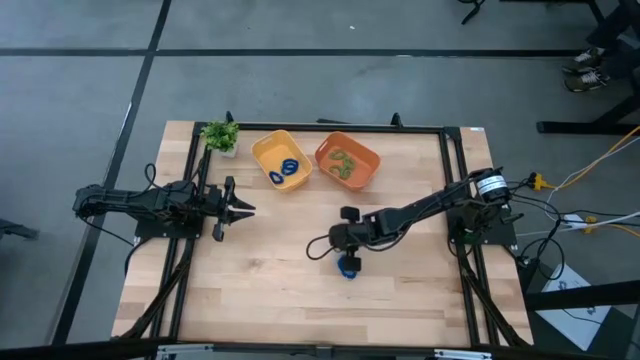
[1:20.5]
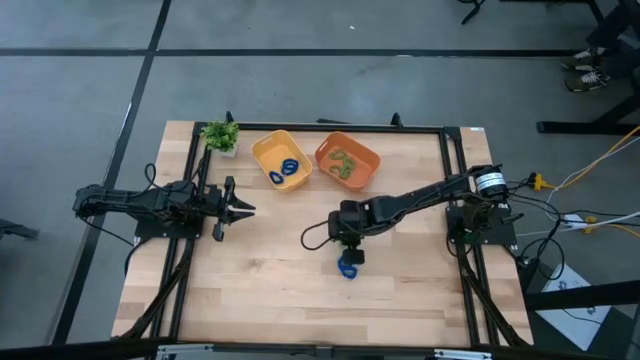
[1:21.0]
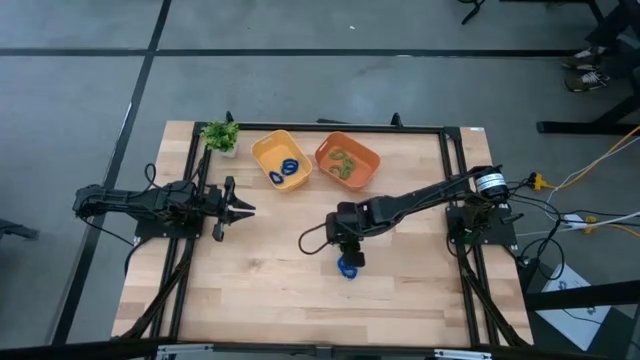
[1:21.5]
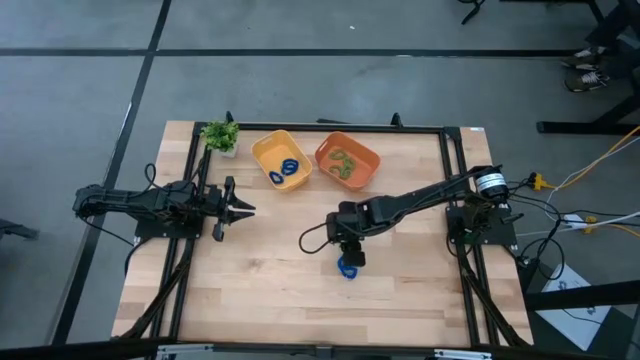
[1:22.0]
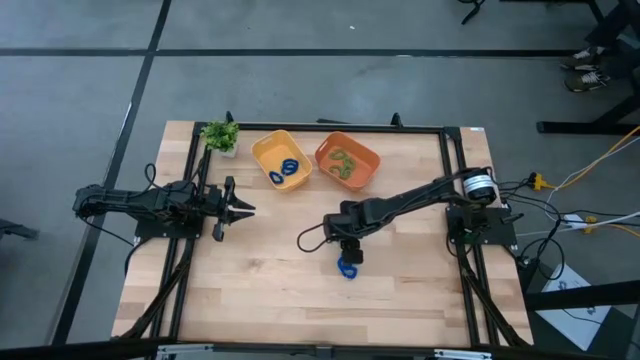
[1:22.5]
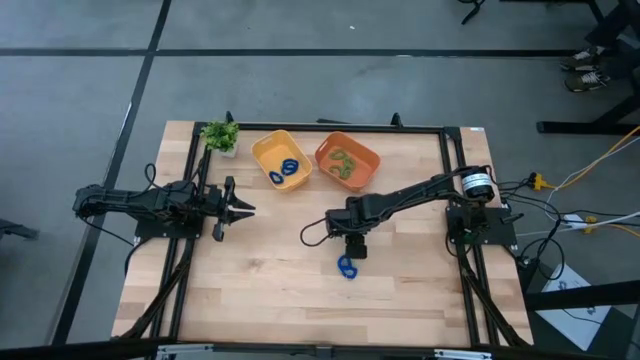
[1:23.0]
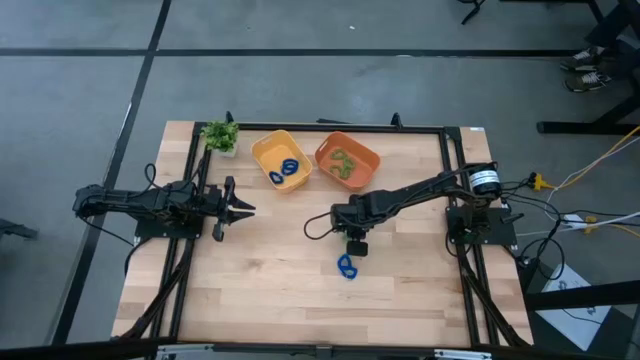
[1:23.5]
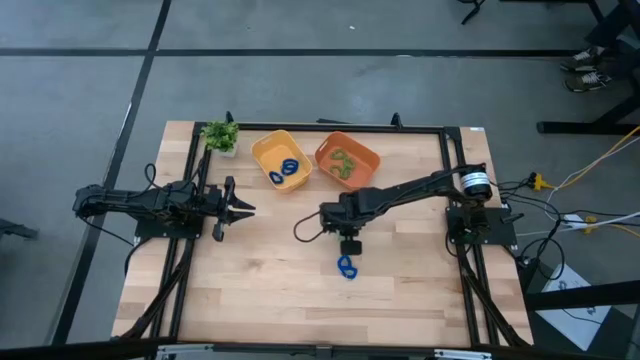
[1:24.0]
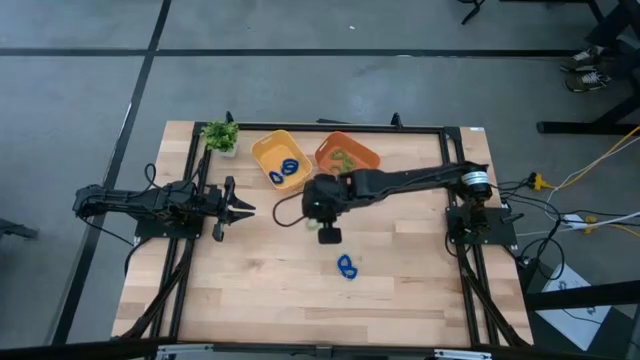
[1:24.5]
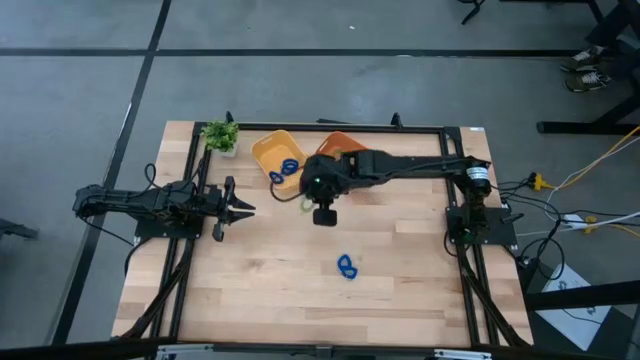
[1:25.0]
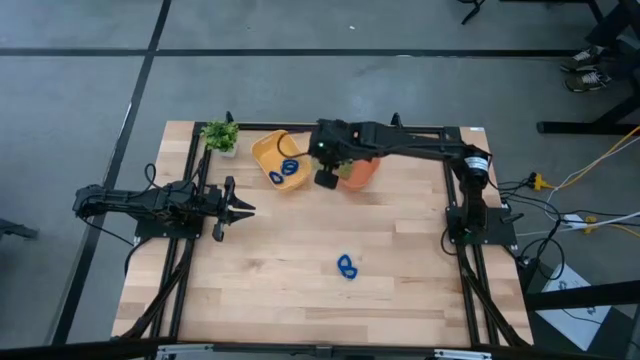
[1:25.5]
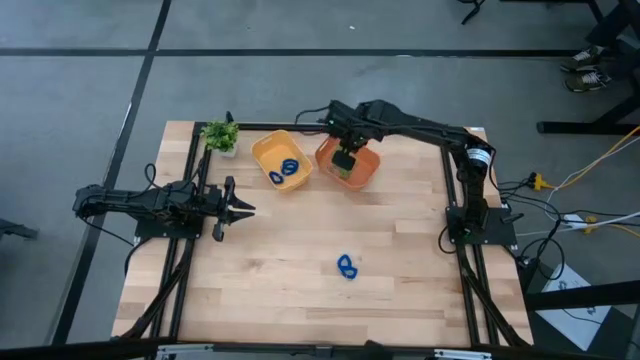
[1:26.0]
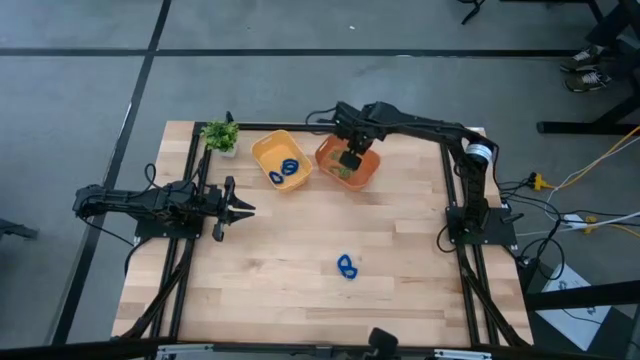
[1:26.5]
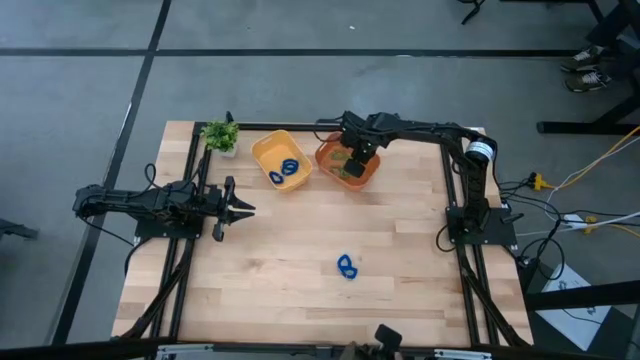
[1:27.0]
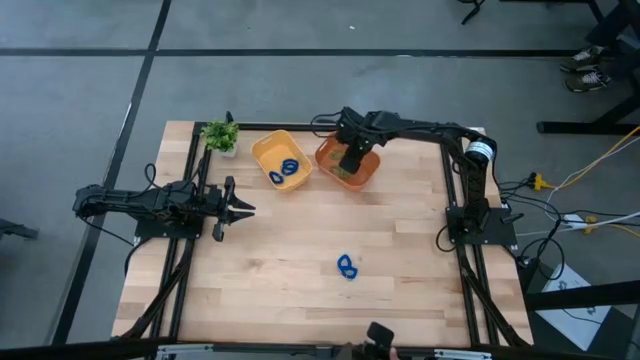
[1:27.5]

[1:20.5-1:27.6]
Task: Sort spring keychains
Put the green spring keychain into the orange bin

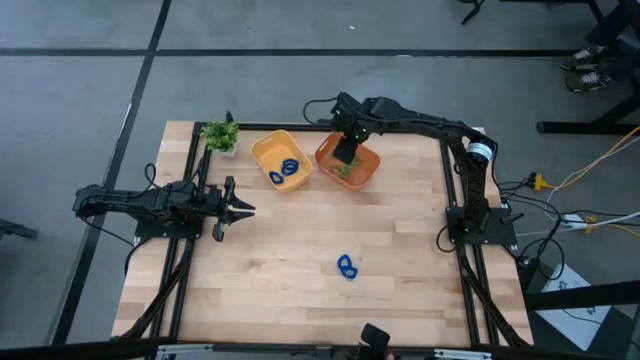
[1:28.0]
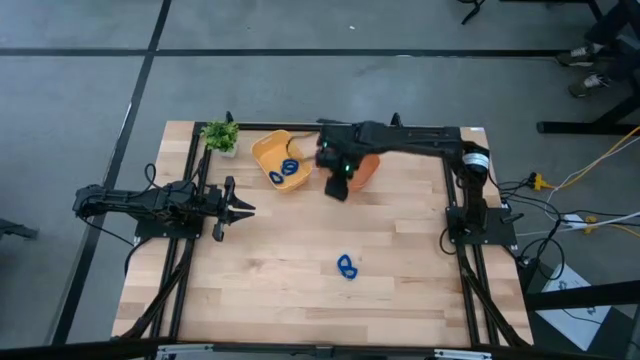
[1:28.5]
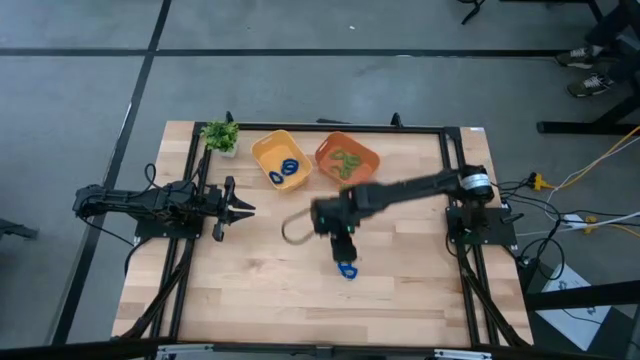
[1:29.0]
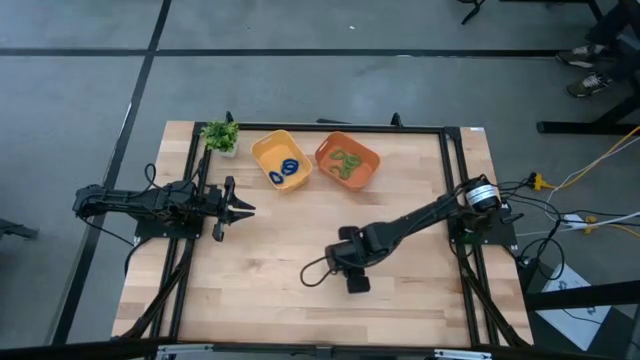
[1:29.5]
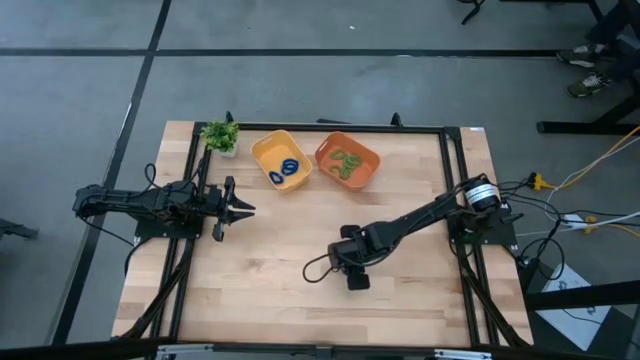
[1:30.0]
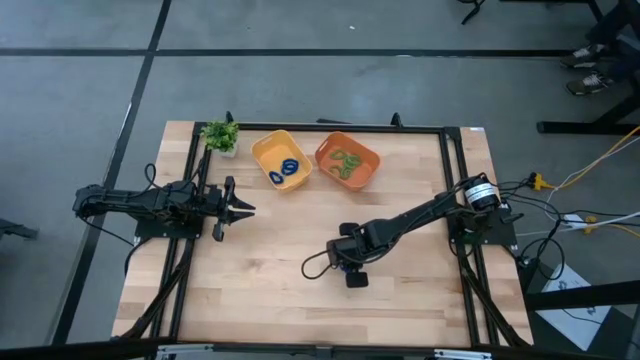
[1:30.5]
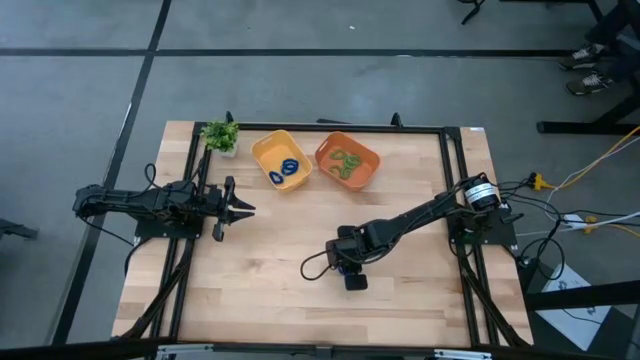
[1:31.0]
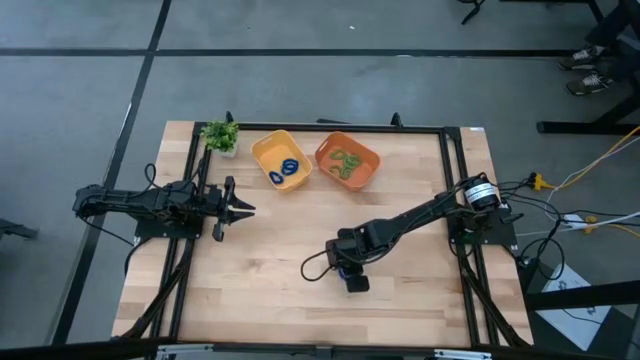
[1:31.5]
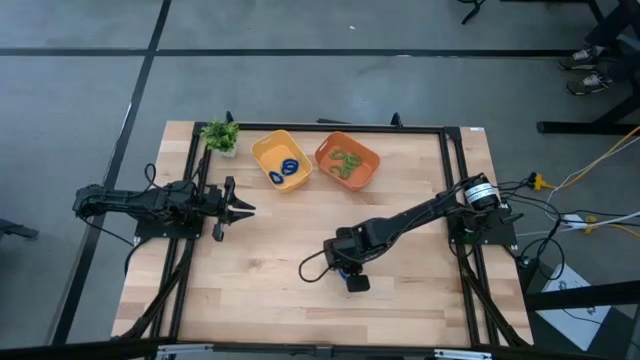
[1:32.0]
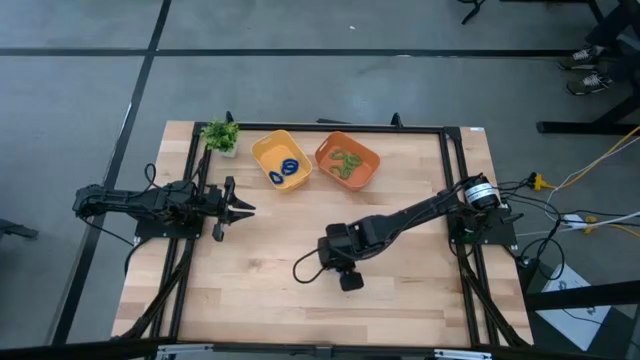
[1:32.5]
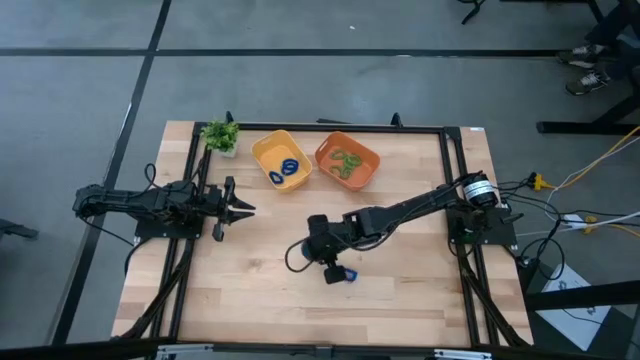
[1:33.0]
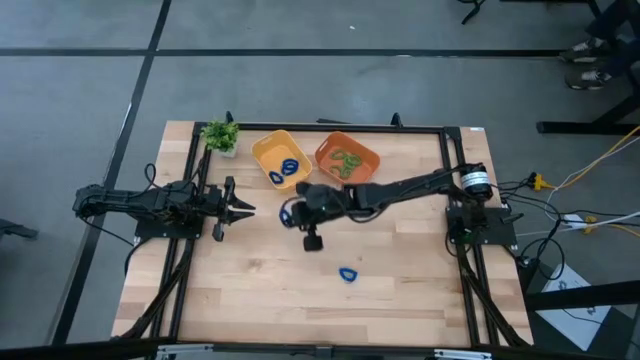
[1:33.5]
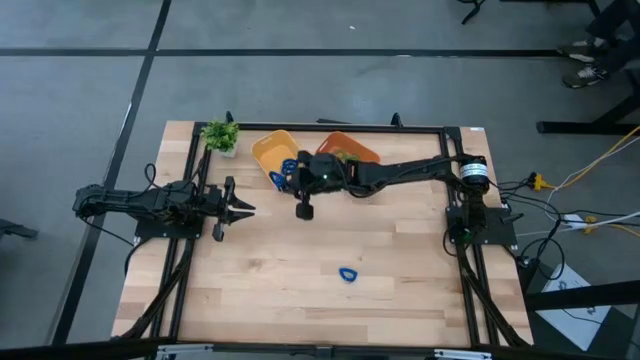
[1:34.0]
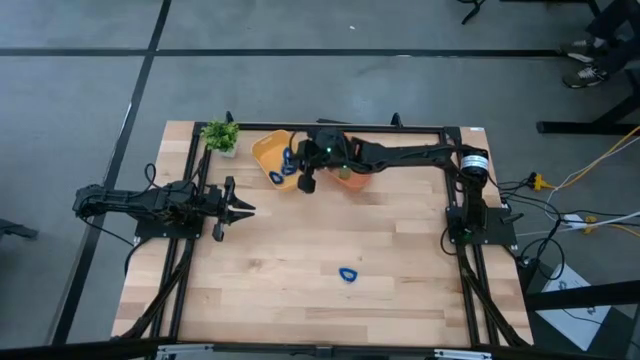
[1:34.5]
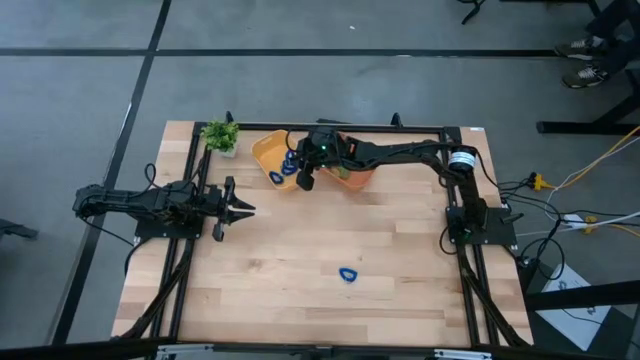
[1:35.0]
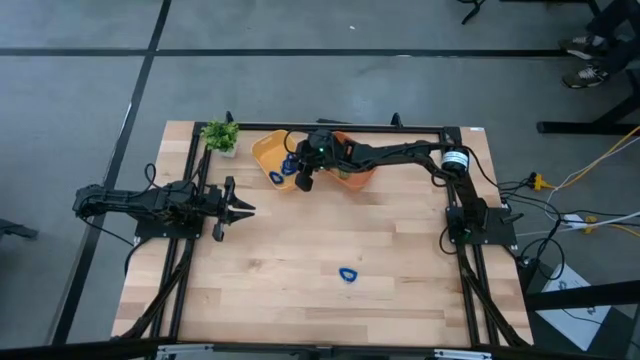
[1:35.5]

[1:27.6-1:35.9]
Put the blue spring keychain into the yellow bin

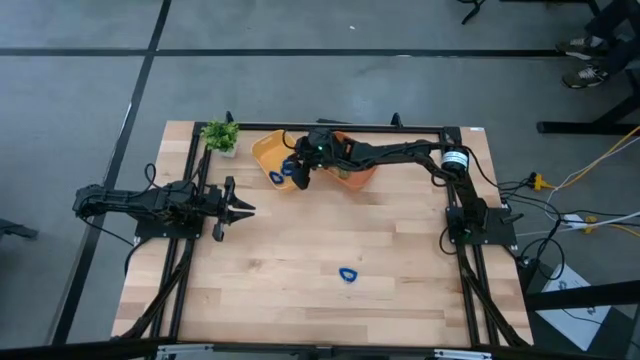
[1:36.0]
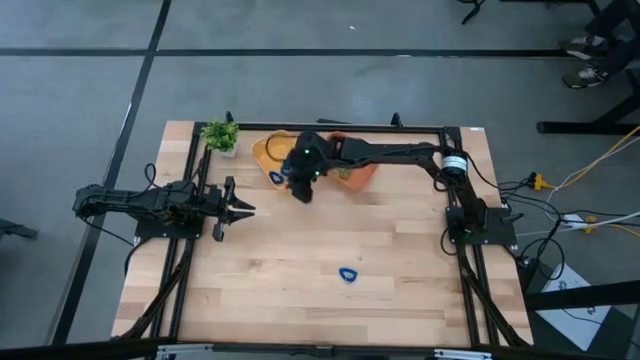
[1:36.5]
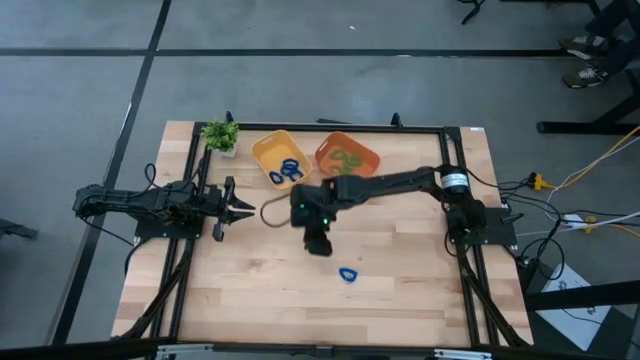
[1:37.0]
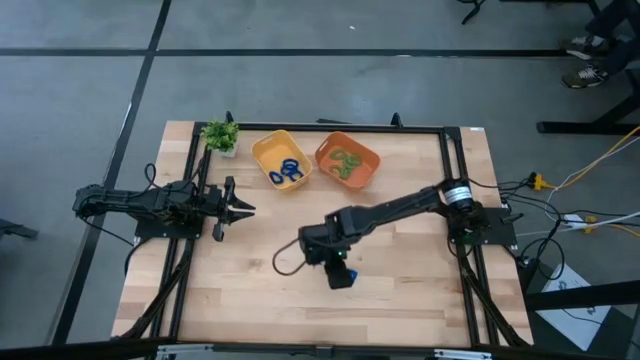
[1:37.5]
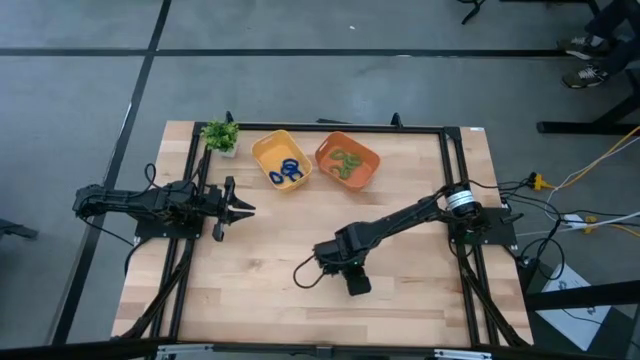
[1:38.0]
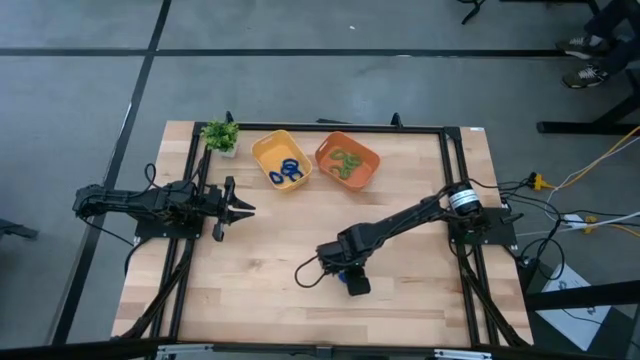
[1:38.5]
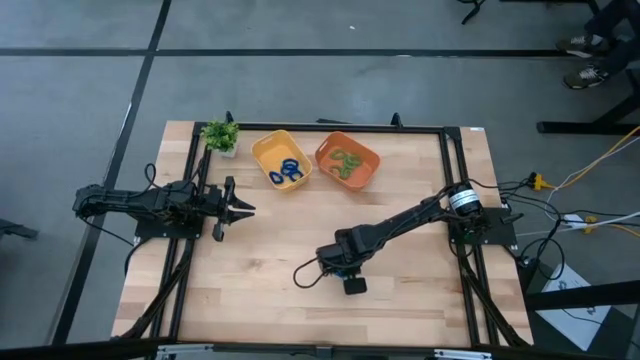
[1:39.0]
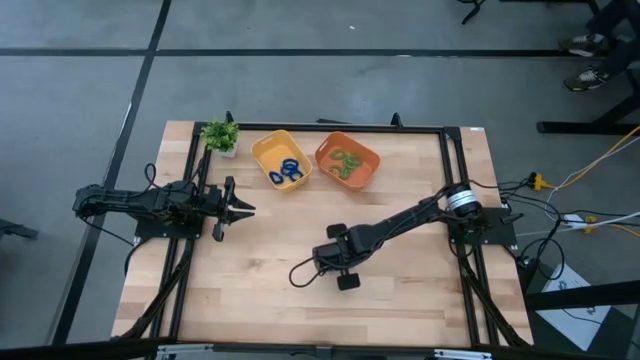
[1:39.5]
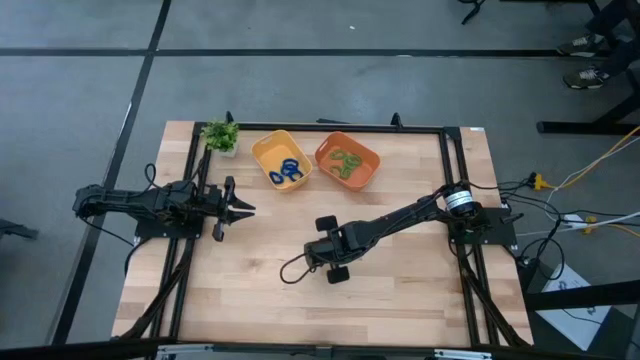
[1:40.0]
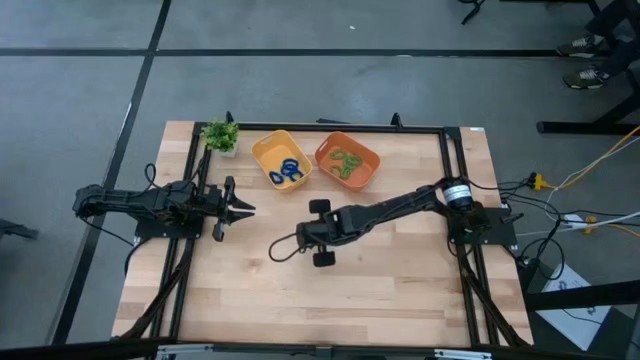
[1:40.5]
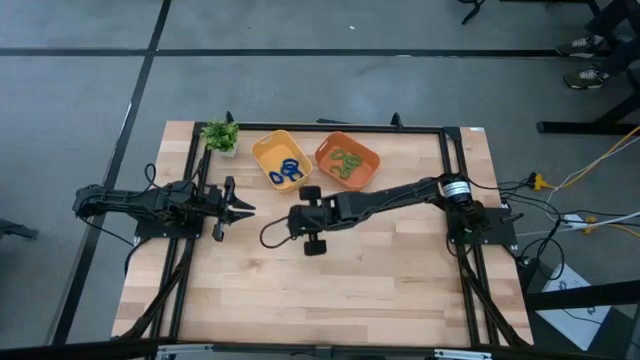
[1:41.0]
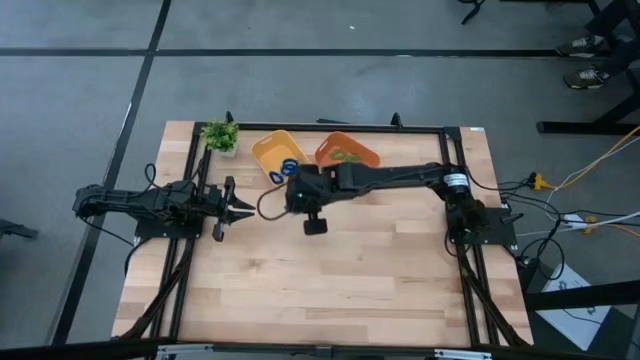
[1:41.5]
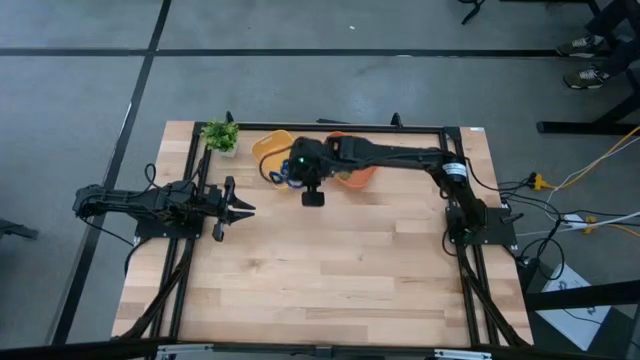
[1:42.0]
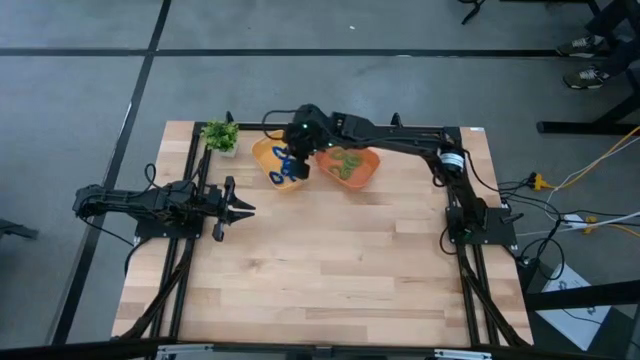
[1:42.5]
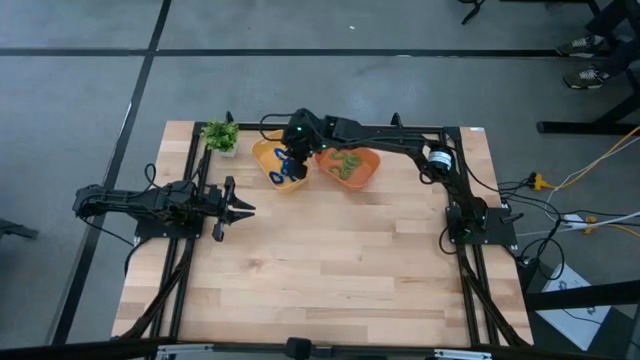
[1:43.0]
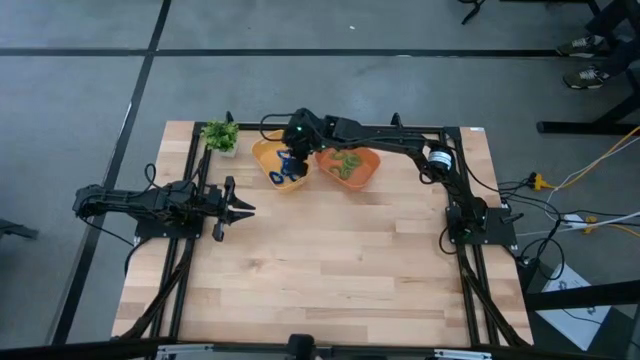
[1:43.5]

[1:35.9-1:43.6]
Put the blue spring keychain into the yellow bin
